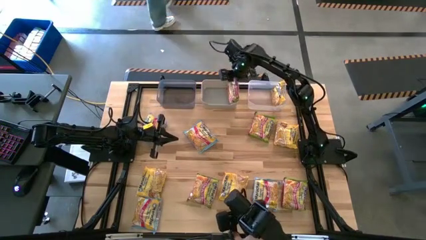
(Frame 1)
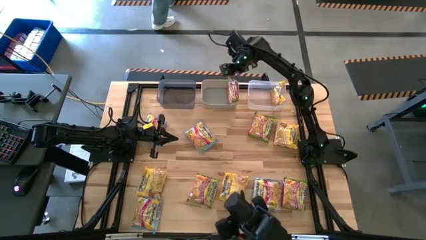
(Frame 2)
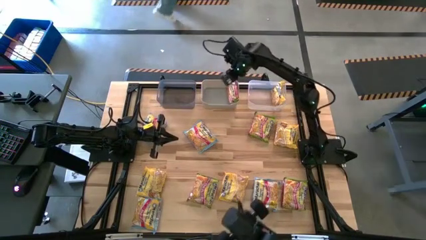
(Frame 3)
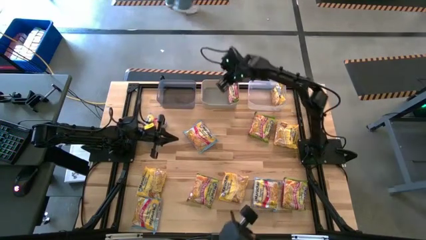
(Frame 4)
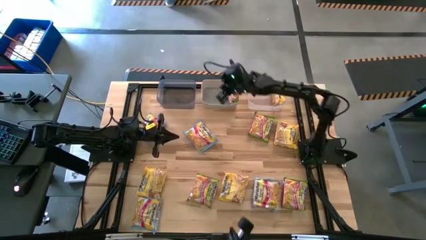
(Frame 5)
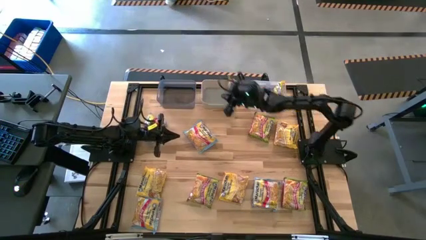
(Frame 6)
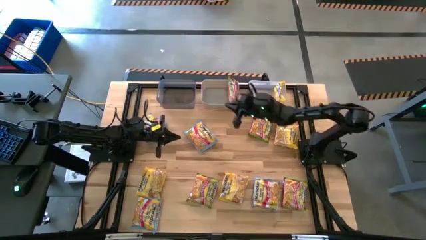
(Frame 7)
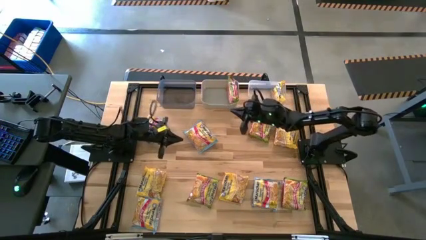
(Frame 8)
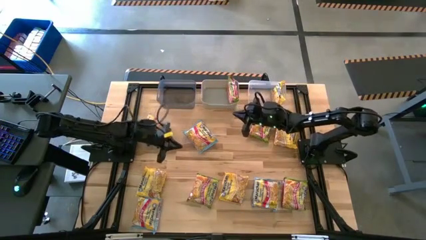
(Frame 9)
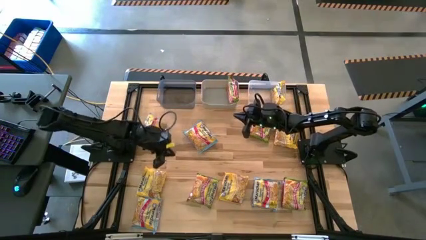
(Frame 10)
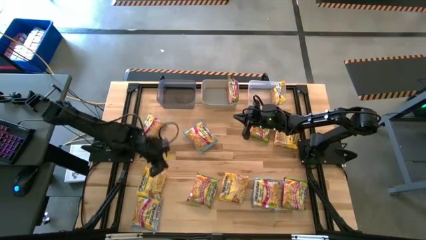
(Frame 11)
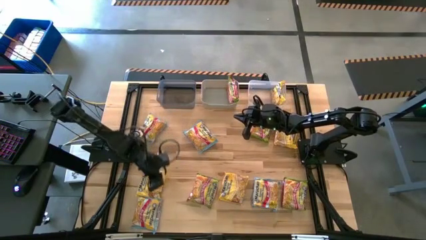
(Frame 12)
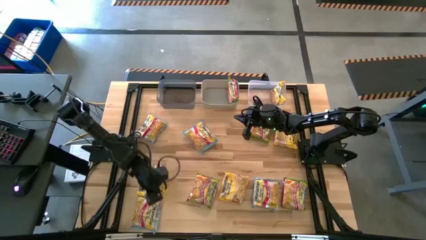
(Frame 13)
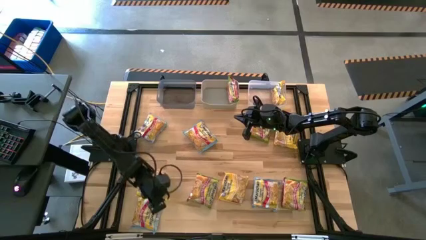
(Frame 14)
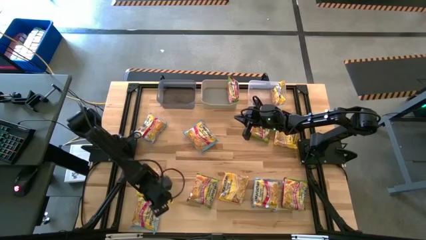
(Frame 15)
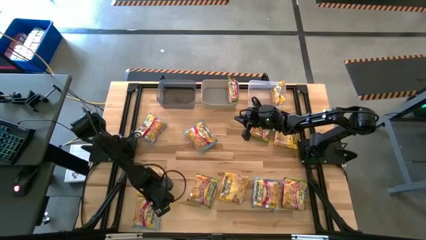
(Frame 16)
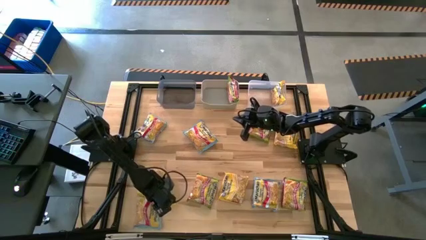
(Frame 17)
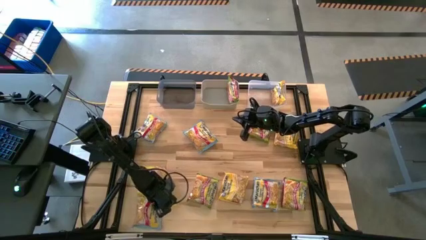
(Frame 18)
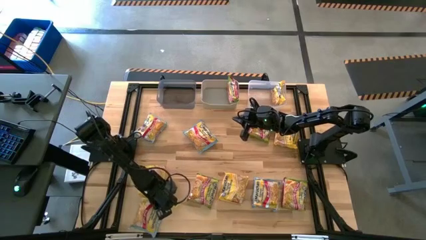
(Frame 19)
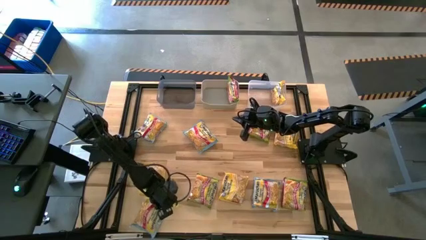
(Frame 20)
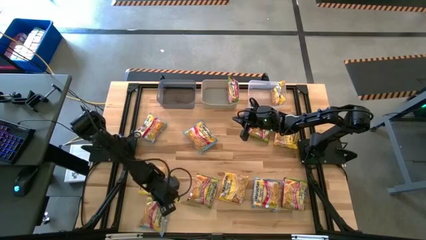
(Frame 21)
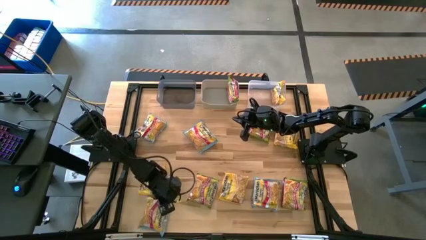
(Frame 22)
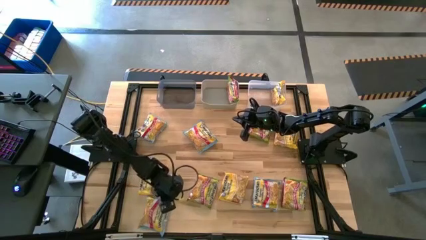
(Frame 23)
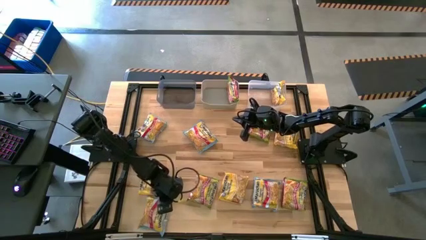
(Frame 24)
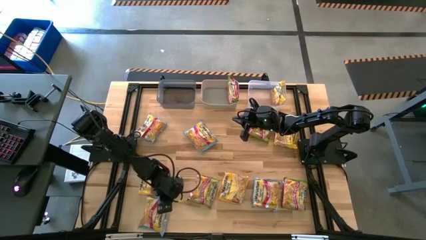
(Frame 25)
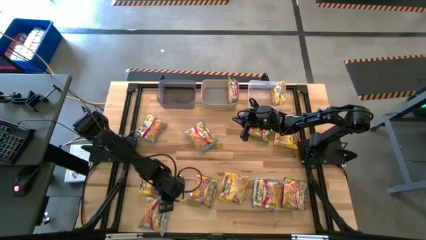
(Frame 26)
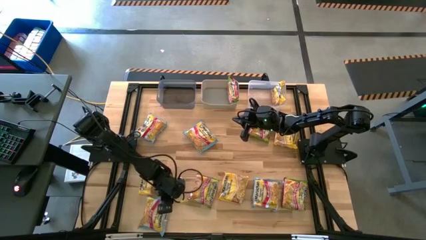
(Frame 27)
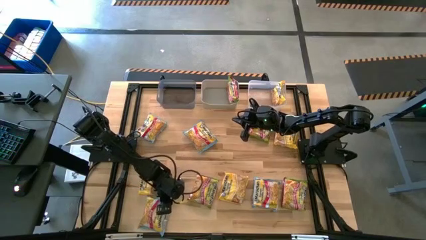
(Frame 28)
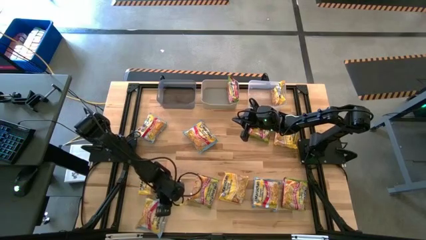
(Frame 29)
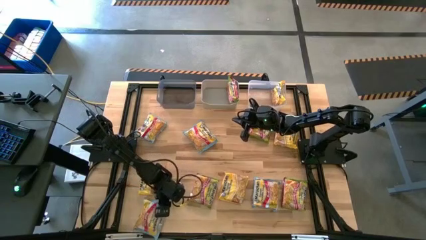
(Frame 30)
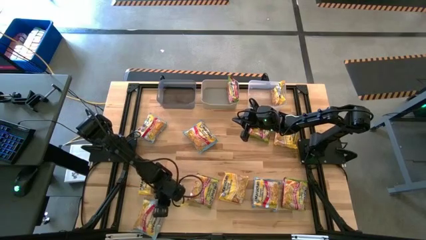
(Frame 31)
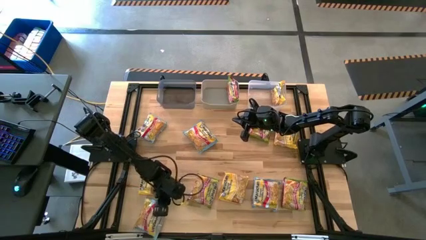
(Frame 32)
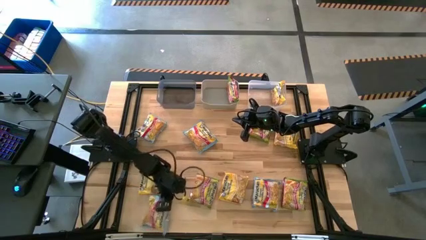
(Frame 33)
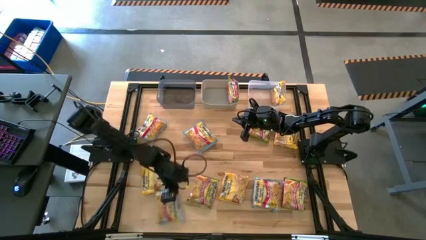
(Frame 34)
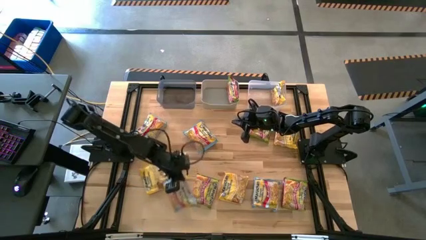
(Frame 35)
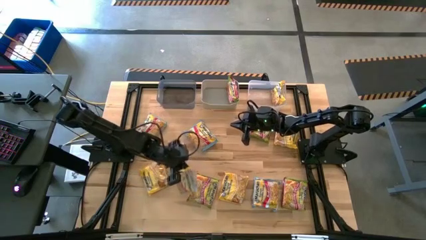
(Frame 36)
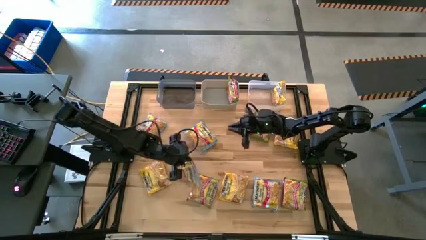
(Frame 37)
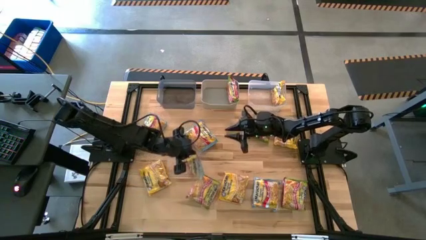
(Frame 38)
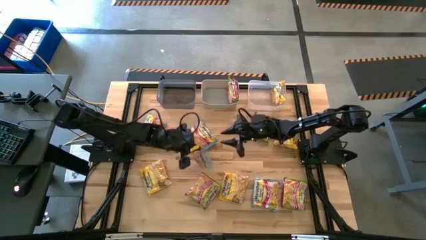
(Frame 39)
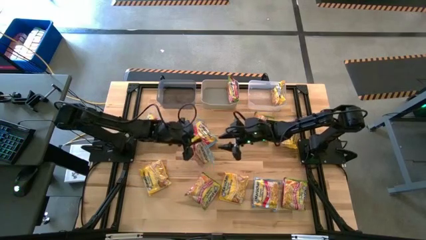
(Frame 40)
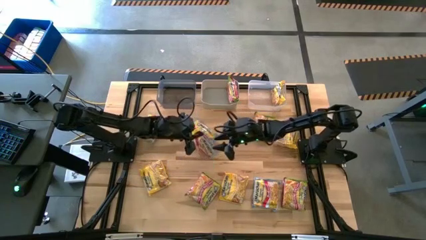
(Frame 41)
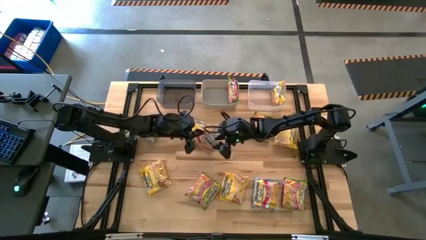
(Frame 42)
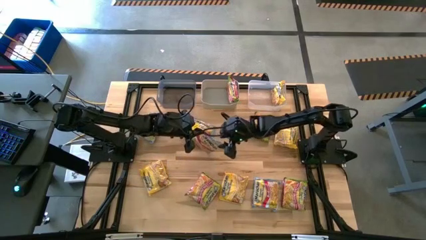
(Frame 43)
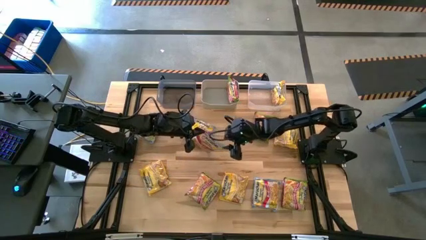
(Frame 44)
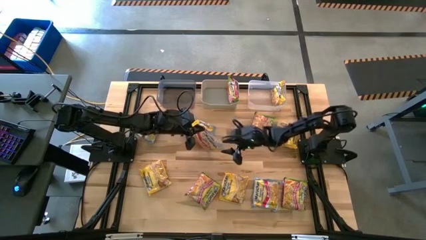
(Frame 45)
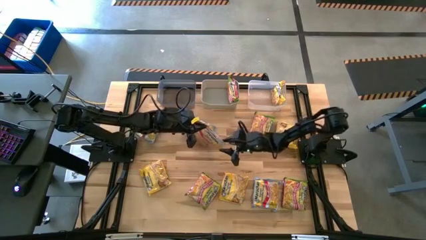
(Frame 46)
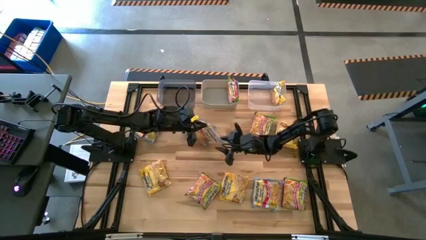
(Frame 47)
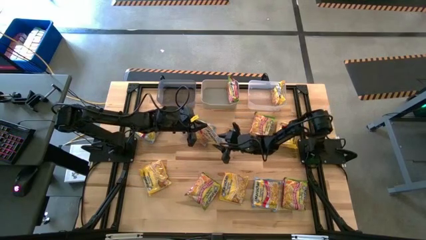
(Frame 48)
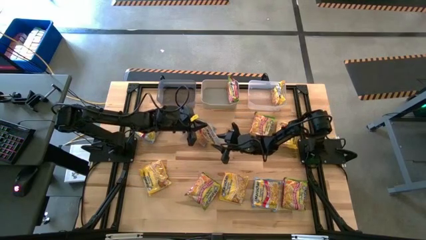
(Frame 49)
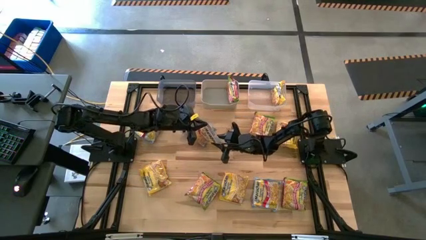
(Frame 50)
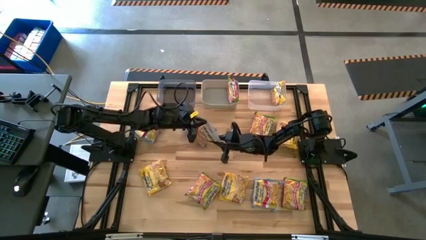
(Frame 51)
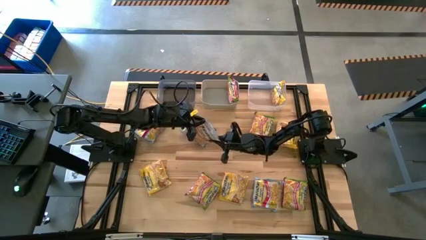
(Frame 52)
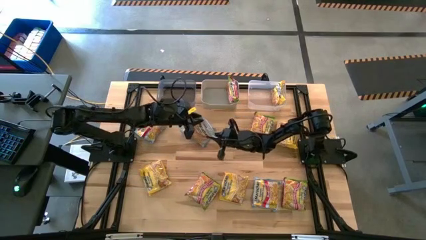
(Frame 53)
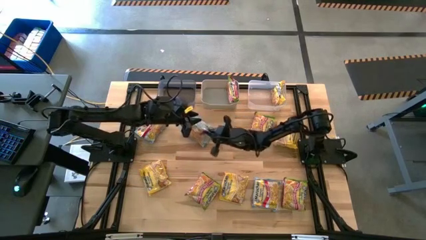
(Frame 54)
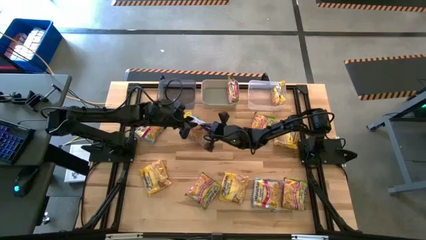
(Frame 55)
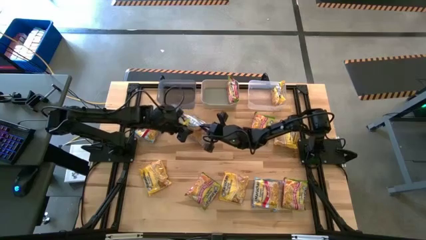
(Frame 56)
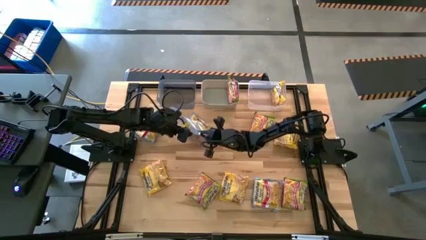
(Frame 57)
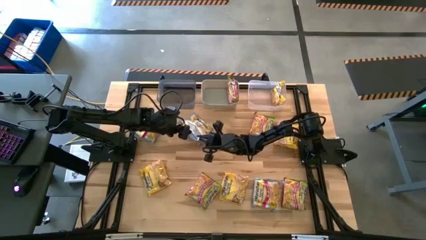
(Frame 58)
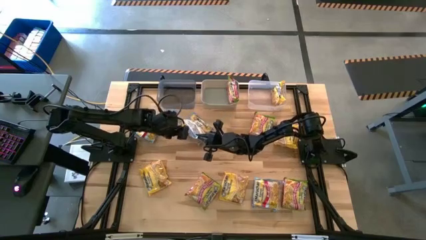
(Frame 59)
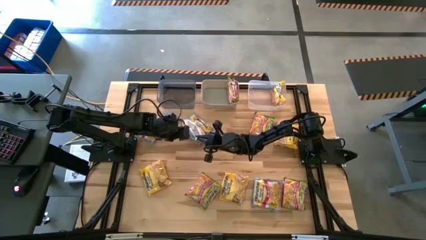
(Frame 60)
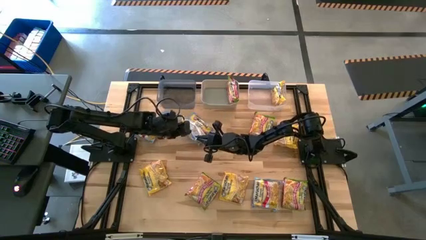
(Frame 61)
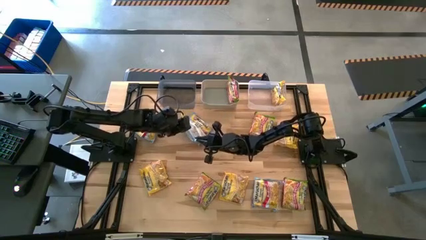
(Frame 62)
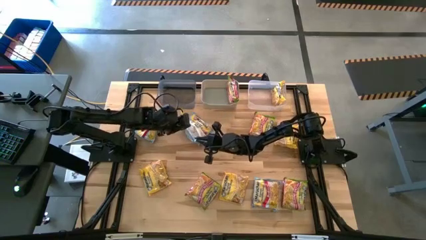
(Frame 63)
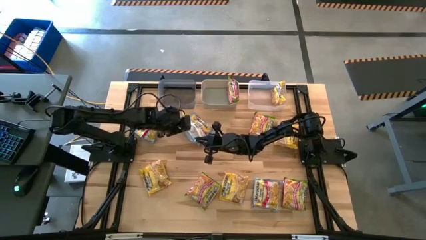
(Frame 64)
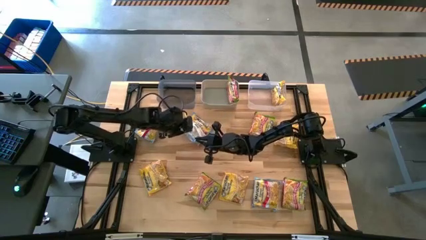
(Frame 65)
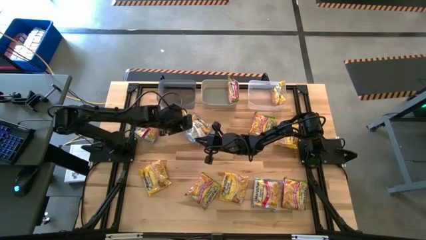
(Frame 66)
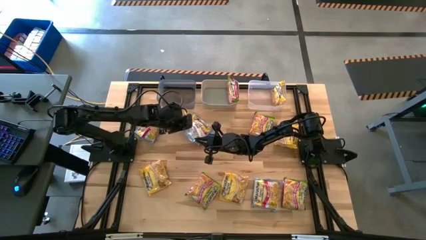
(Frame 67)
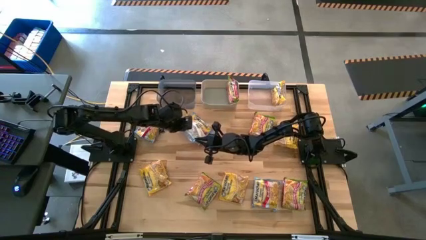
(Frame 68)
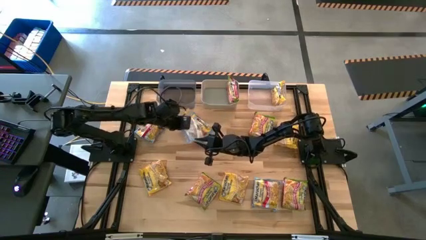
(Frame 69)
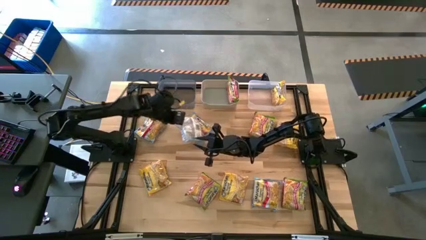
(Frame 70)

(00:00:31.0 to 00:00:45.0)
Task: Sort Maruchan noodles
Put the blue noodle pack into the black bin

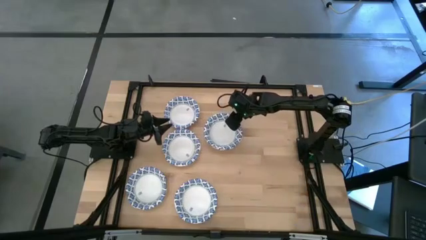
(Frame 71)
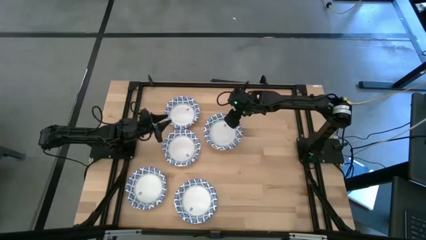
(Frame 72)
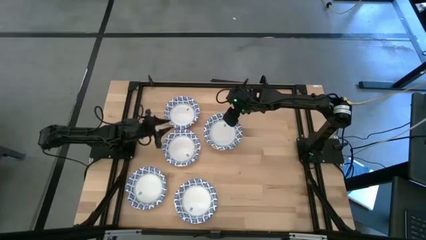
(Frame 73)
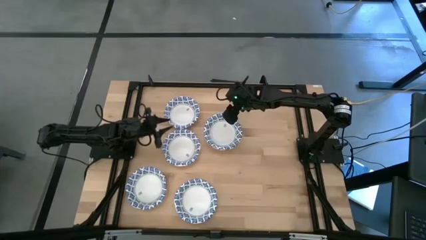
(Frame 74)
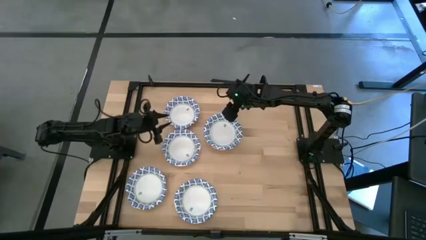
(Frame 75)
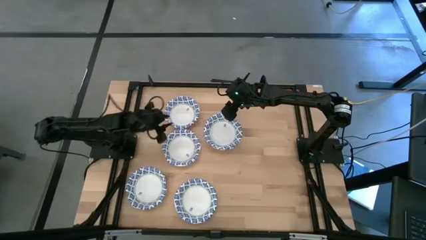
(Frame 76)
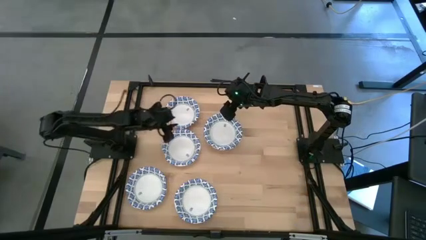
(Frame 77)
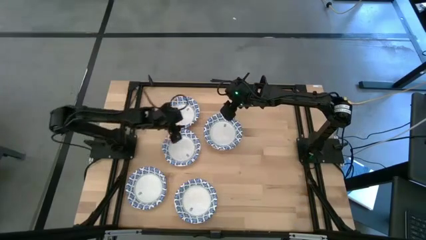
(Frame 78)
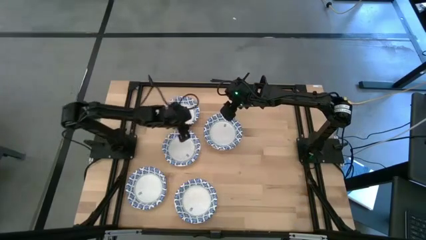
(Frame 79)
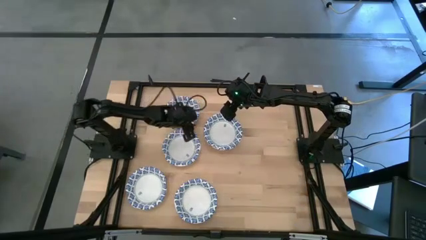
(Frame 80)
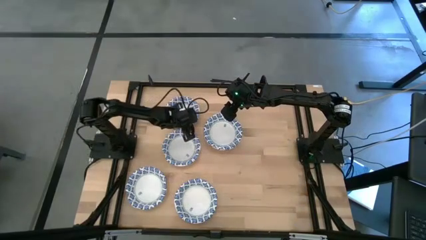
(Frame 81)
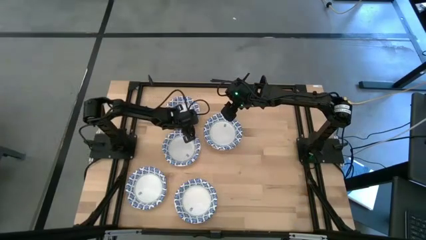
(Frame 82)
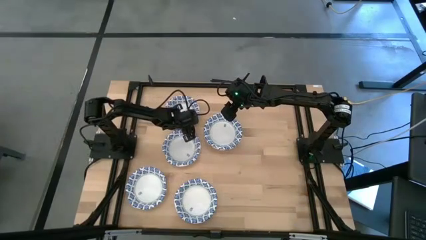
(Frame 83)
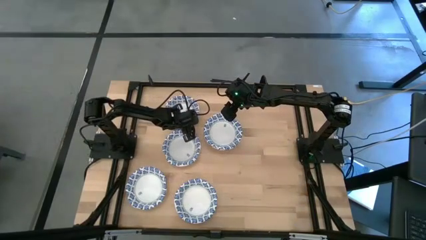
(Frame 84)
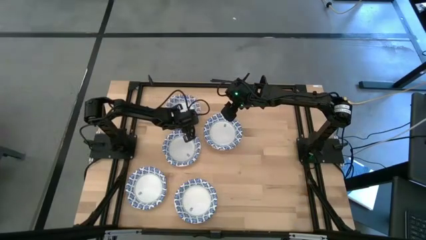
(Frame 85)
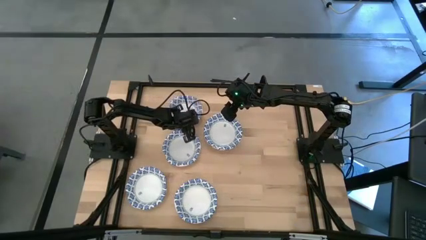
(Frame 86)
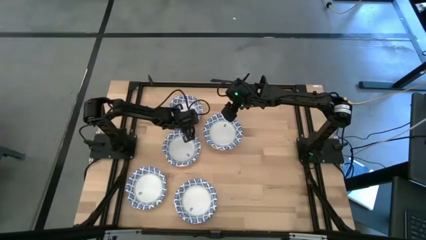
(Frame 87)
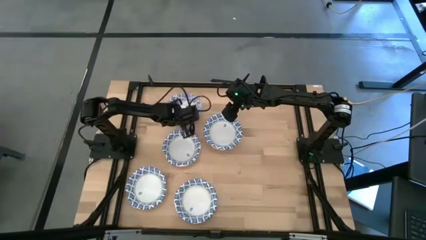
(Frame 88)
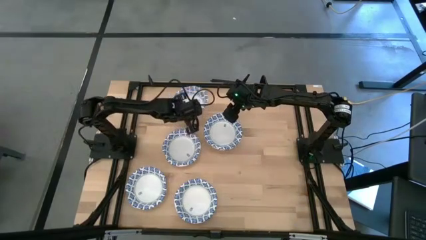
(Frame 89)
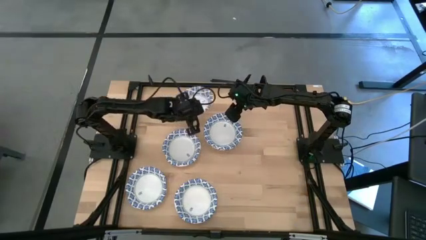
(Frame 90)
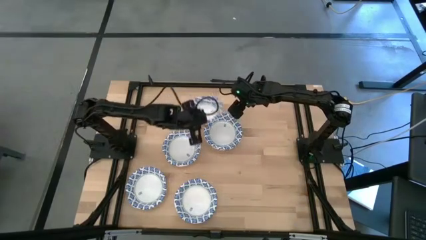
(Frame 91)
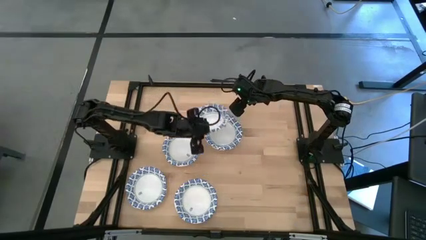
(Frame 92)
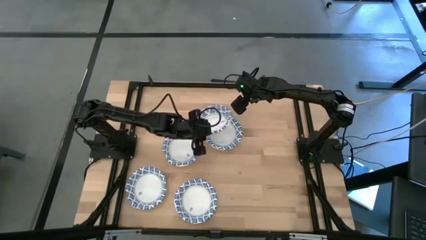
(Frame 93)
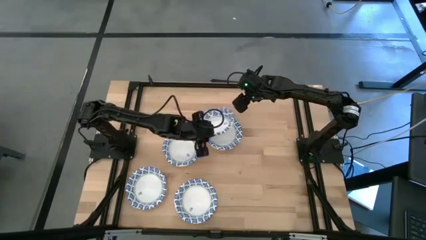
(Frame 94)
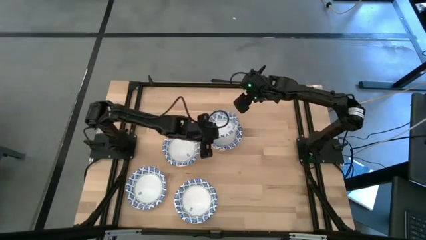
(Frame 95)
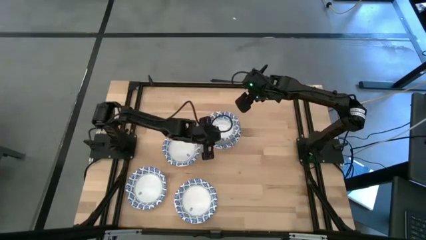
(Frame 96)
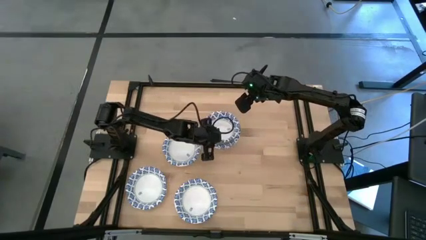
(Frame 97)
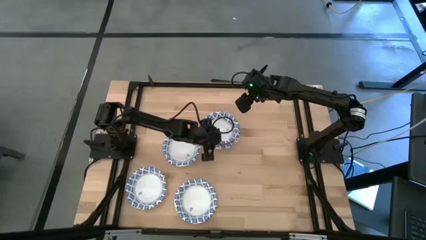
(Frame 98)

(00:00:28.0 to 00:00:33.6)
Task: Nest bowls inside each other
Stack the blue patterned bowl on top of the other blue patterned bowl
